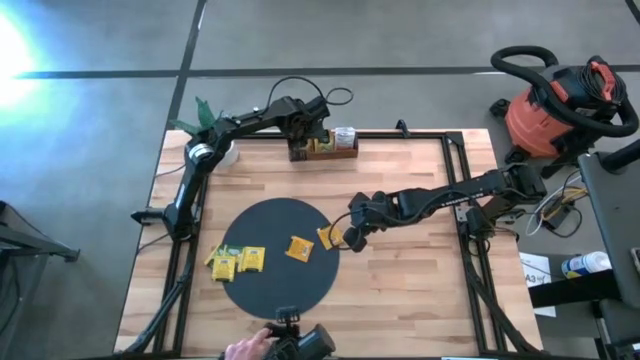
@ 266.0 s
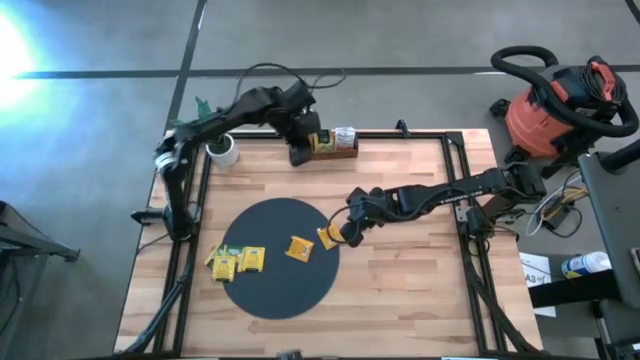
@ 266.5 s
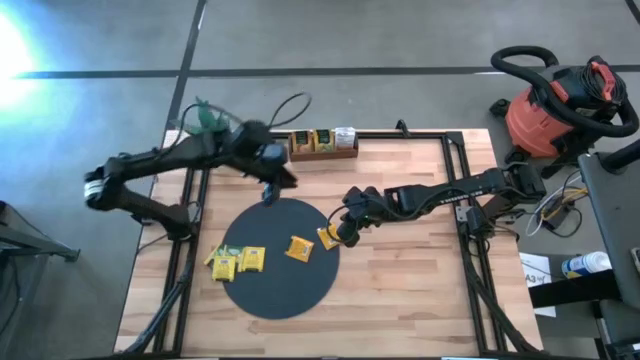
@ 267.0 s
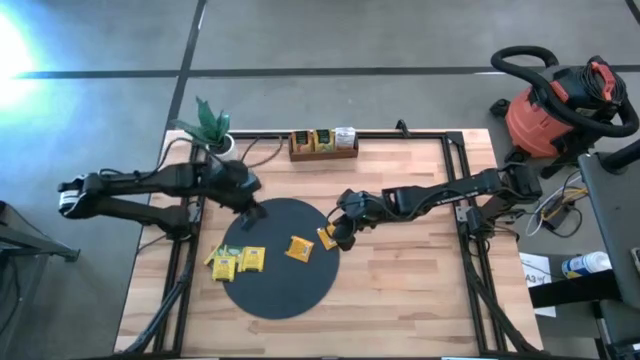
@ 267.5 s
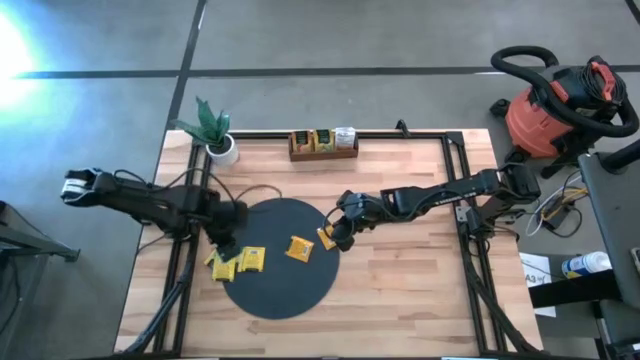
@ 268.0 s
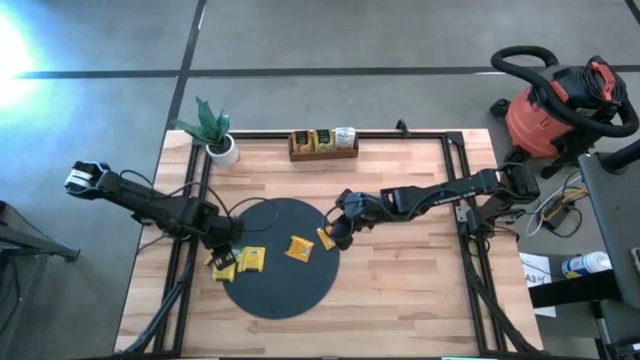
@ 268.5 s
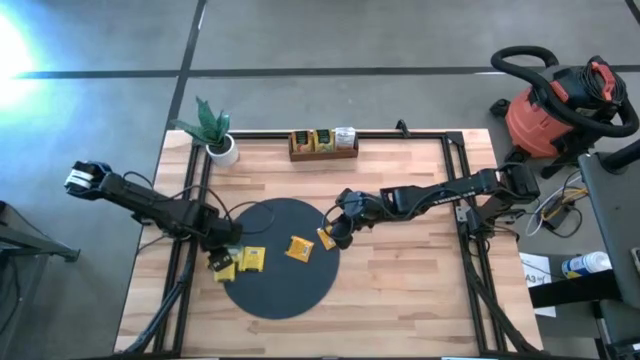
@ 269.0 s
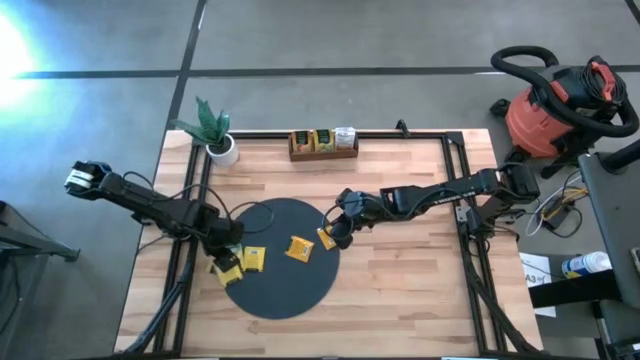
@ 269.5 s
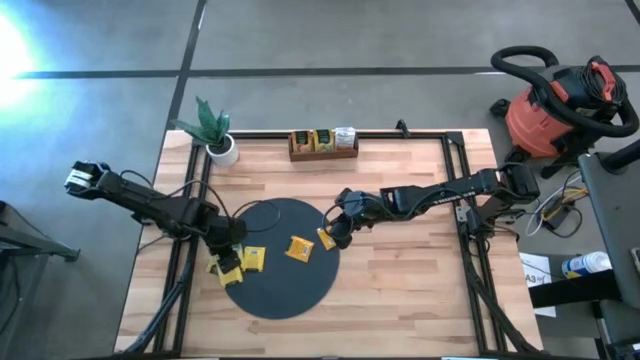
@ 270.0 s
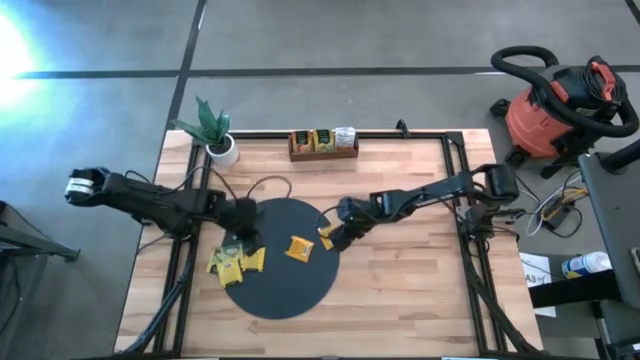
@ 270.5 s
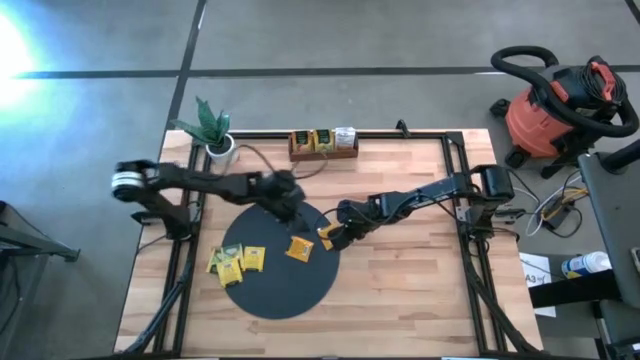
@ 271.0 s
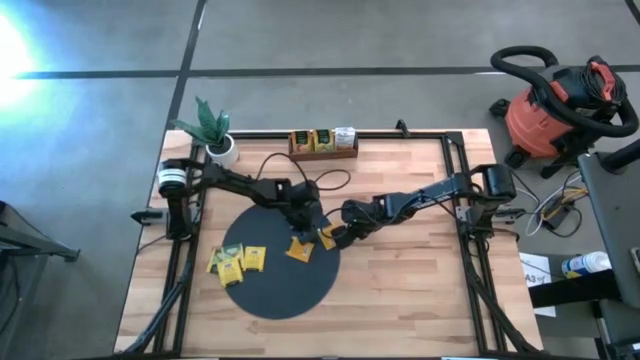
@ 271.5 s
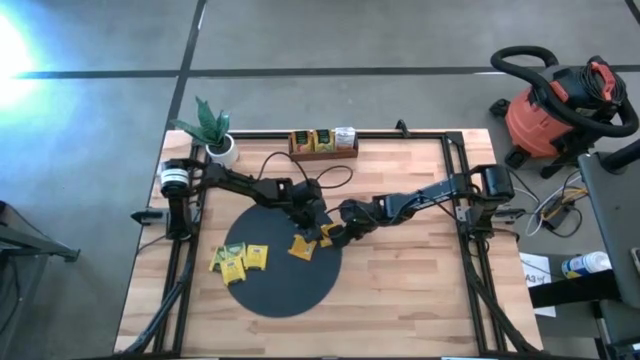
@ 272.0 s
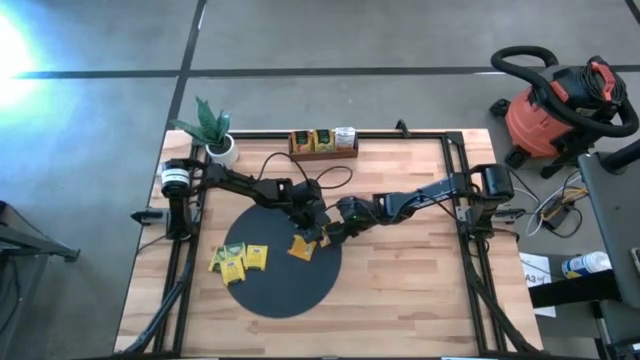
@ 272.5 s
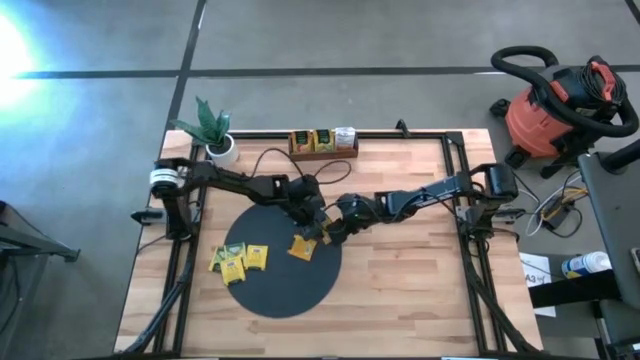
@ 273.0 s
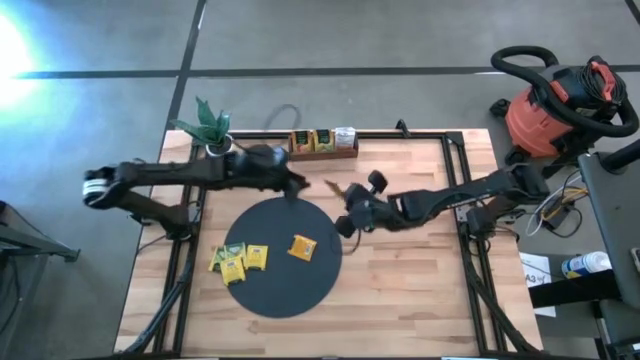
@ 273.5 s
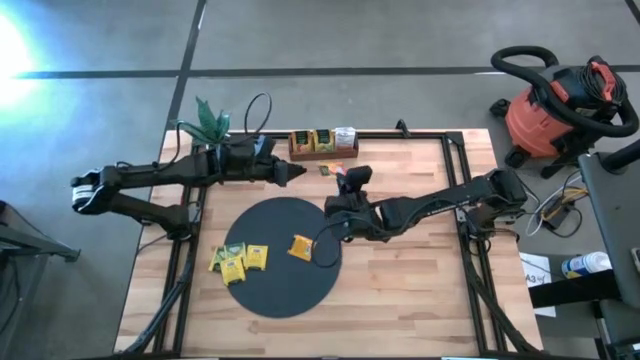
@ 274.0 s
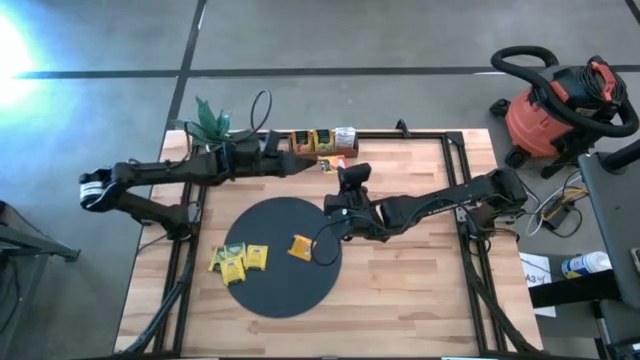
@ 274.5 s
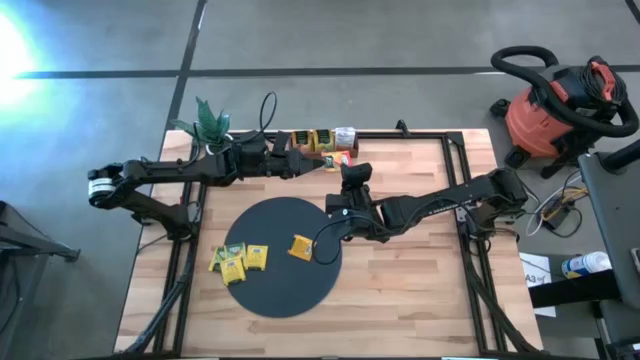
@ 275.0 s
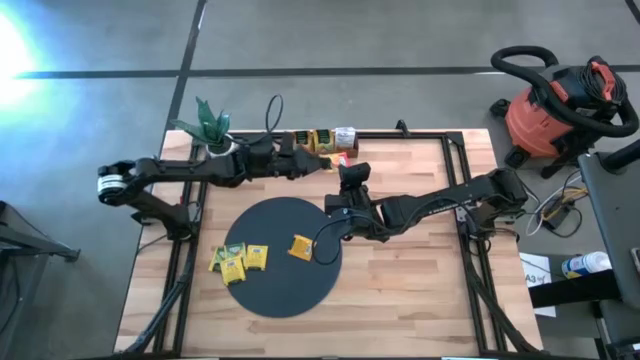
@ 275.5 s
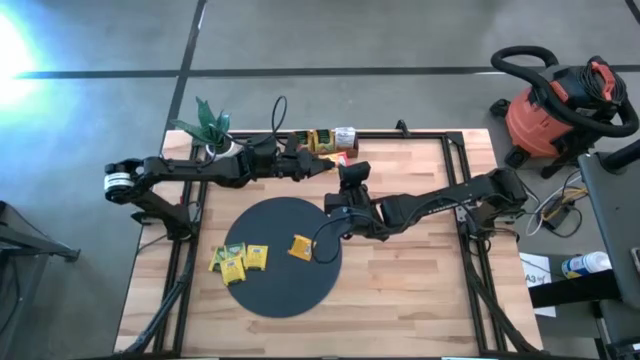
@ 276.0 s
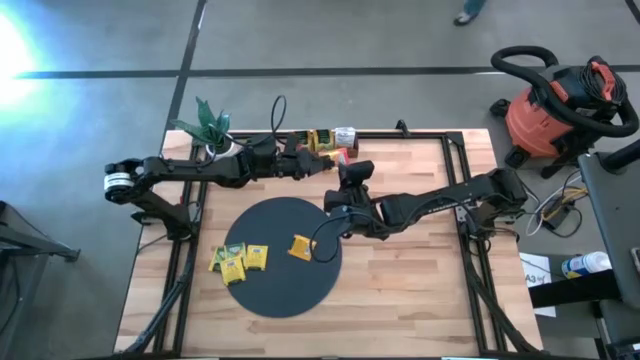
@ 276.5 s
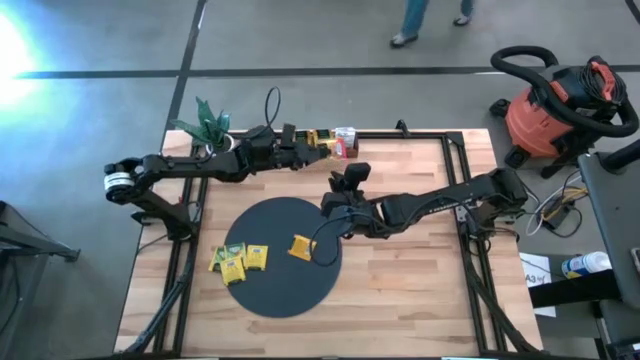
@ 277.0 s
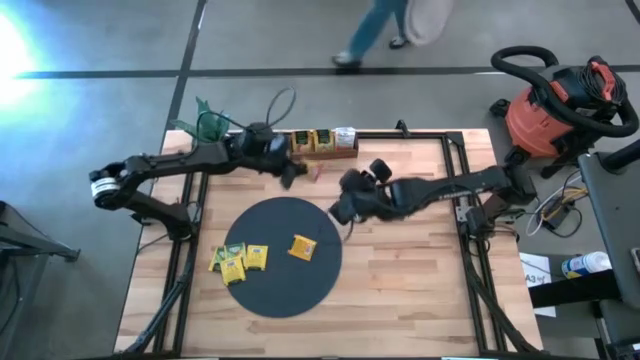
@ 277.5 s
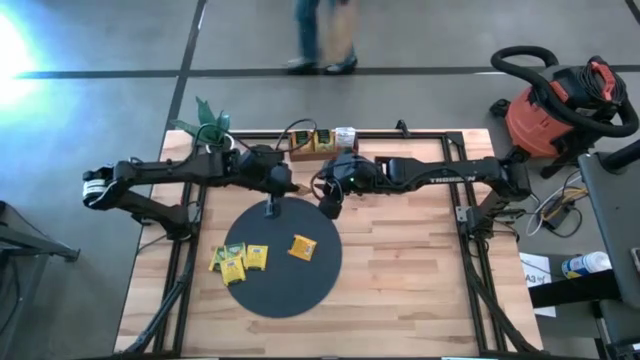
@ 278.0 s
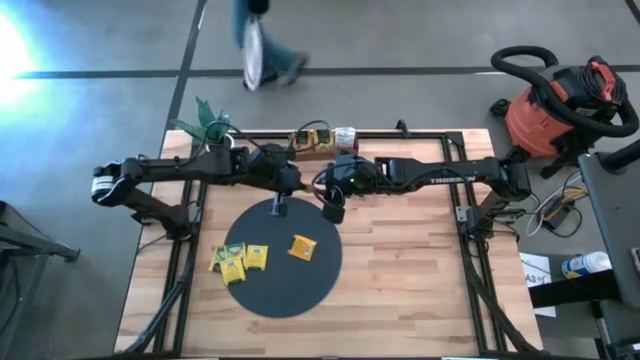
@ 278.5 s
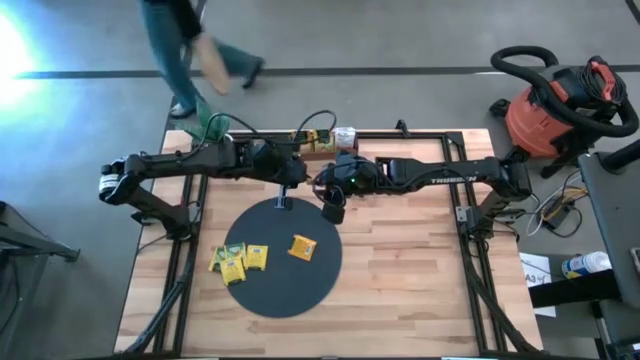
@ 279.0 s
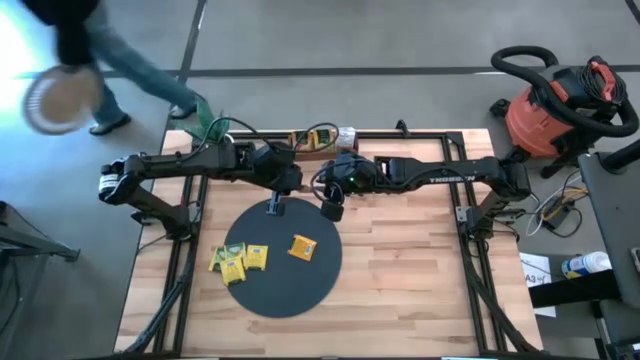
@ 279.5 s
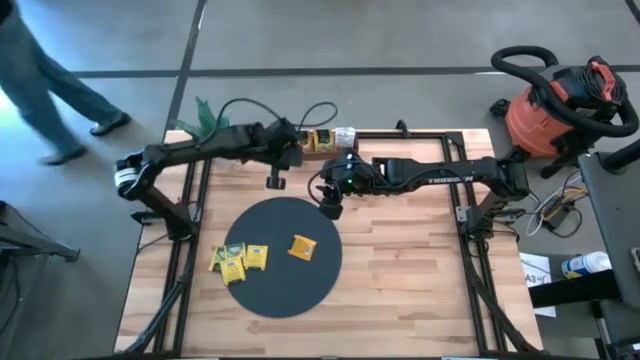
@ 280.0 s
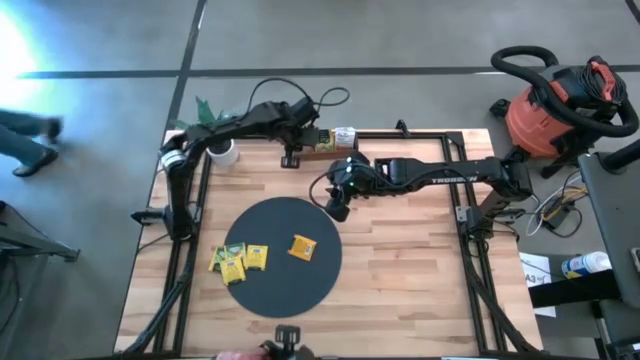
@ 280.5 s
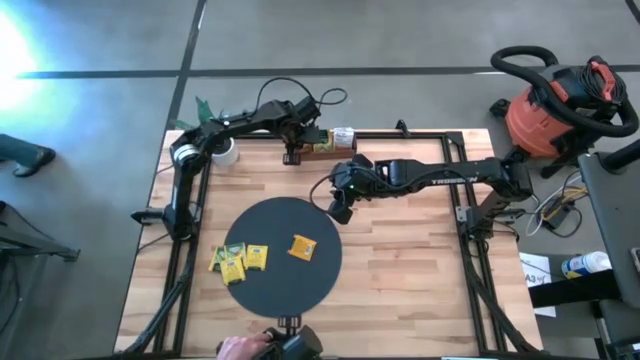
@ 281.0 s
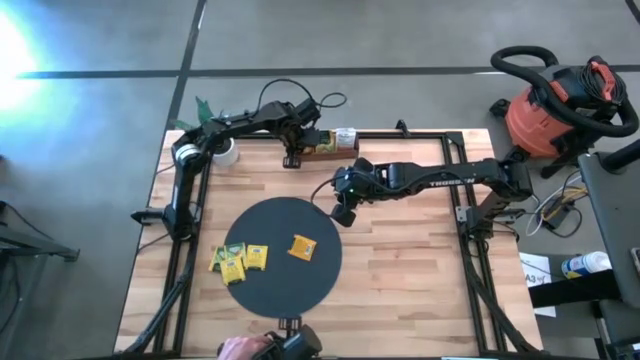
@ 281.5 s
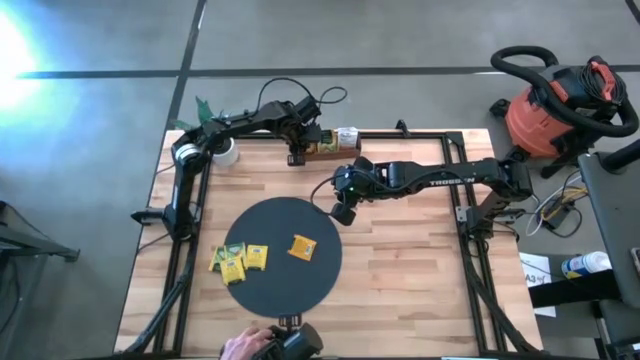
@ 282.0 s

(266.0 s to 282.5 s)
Task: Pick & Place Tea
Put the orange tea bag into the left section of the wooden organizer

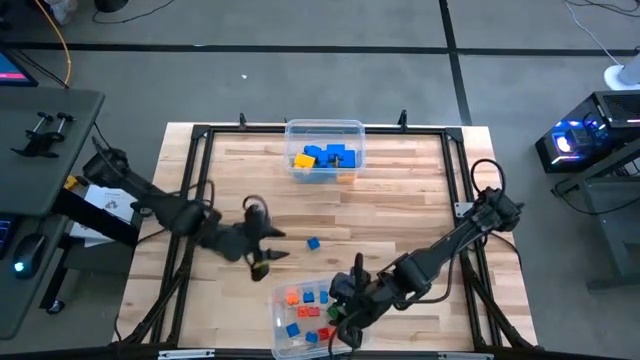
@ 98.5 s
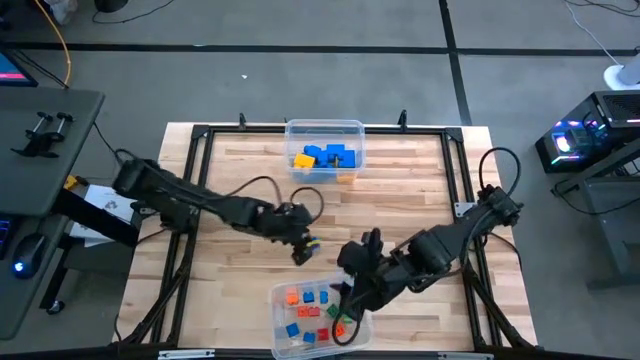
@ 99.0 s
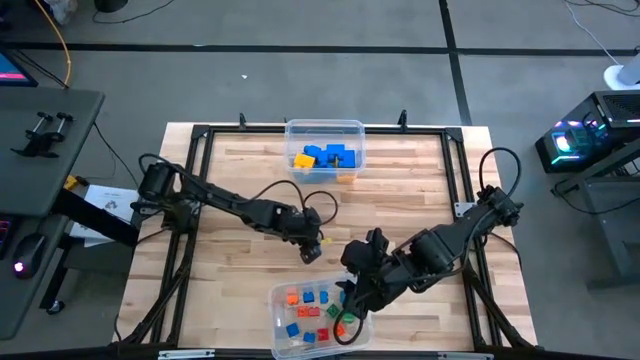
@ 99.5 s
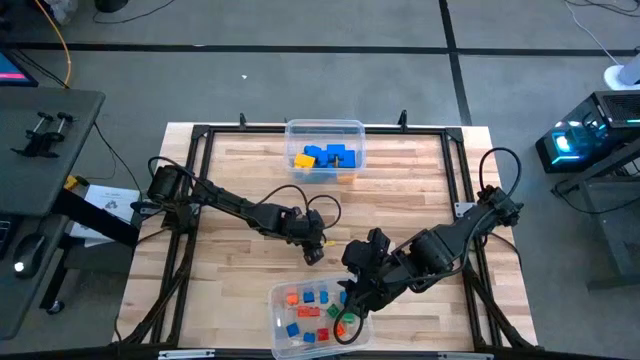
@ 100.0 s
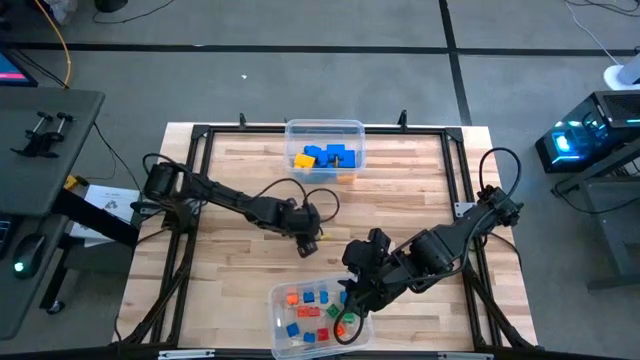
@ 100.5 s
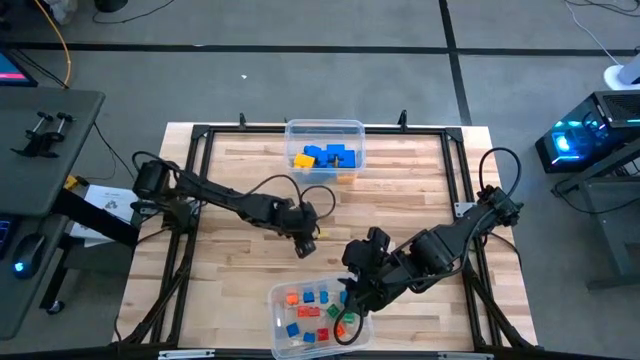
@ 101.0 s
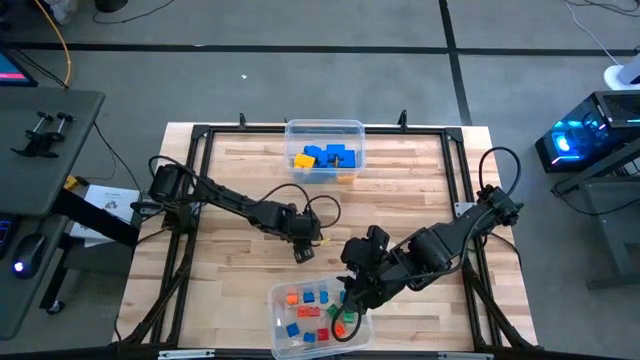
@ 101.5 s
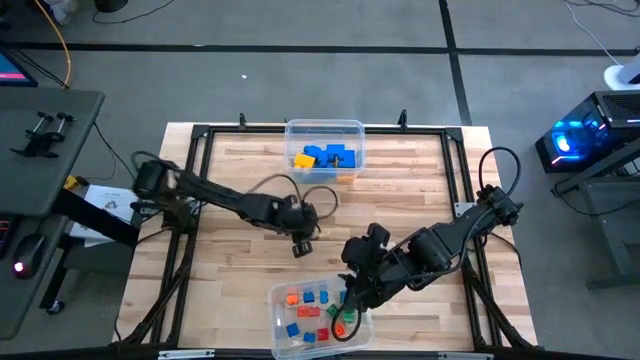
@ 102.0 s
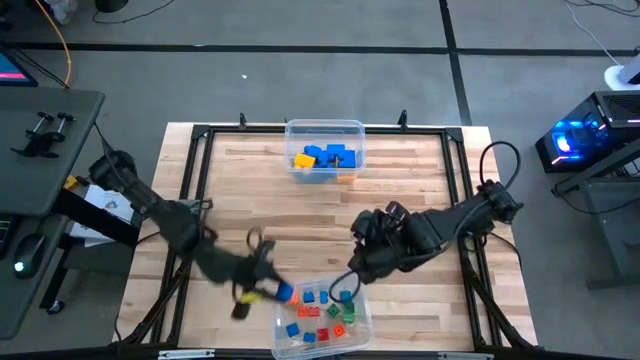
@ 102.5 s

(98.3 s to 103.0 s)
Task: Sort blocks by size
Put the small blue game piece into the bottom transparent bin
